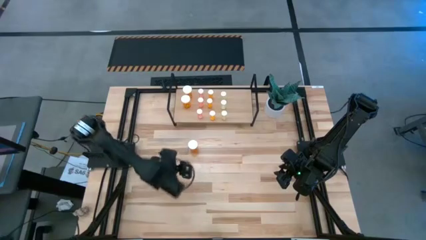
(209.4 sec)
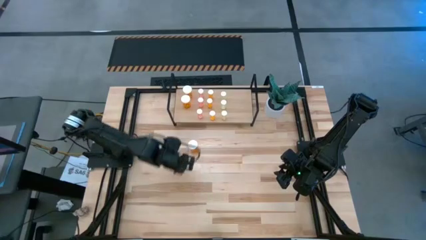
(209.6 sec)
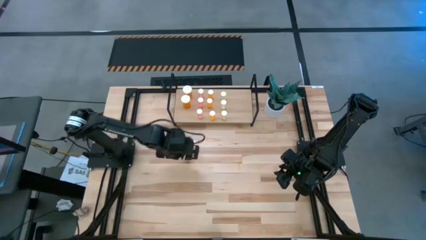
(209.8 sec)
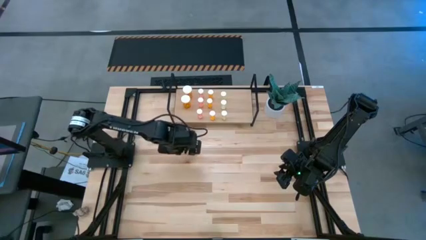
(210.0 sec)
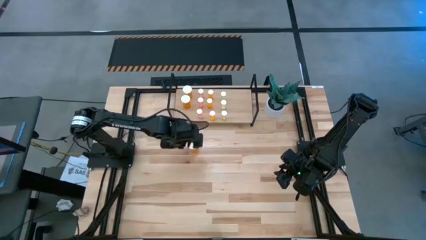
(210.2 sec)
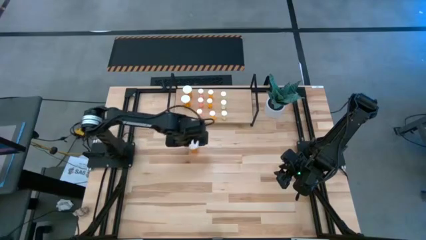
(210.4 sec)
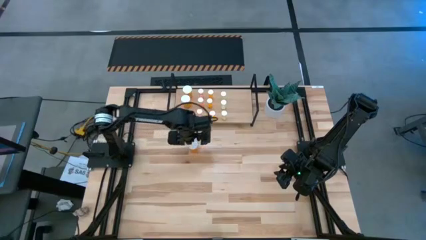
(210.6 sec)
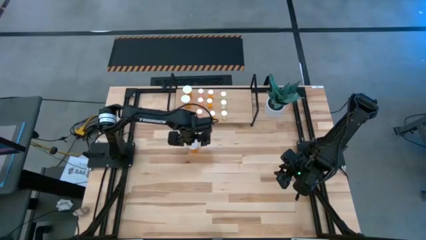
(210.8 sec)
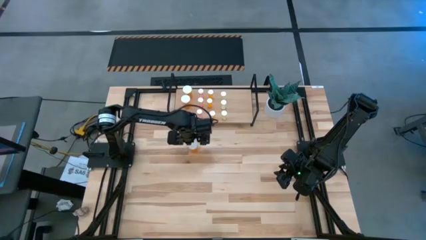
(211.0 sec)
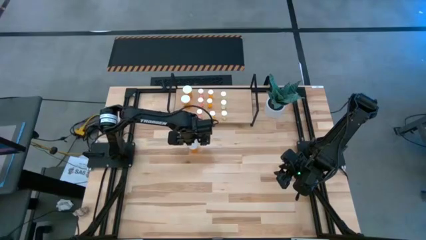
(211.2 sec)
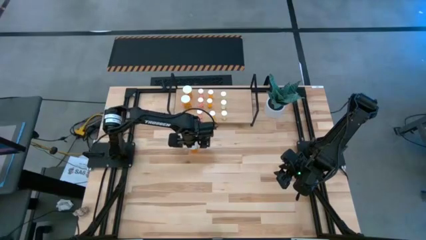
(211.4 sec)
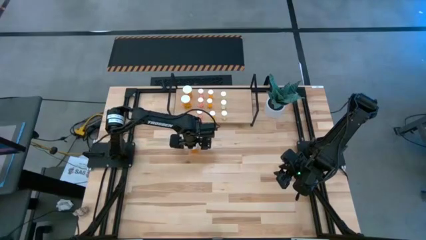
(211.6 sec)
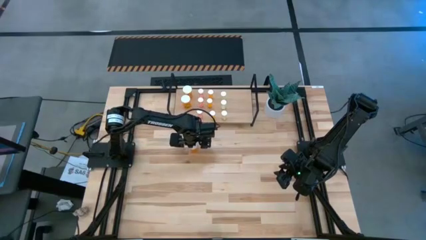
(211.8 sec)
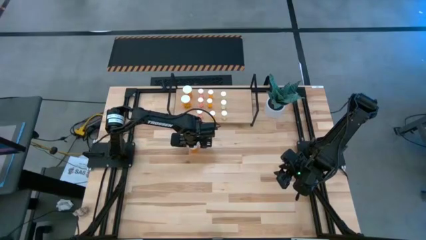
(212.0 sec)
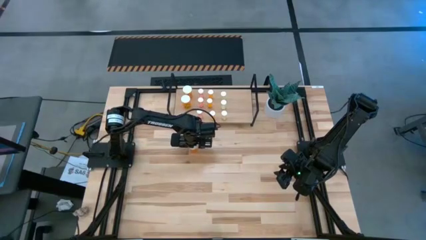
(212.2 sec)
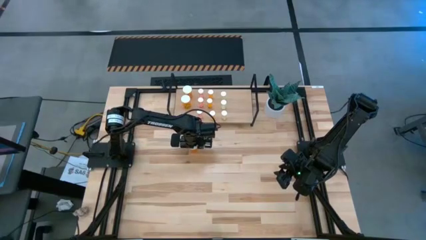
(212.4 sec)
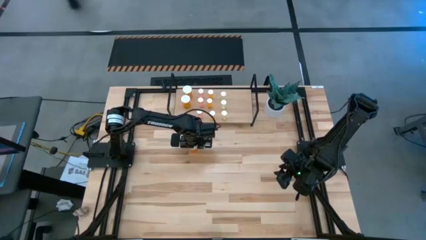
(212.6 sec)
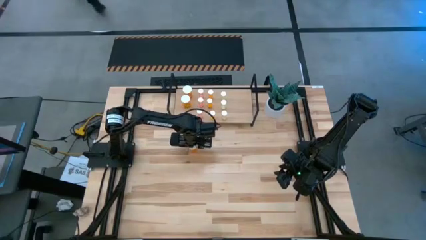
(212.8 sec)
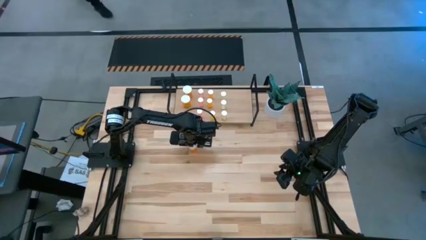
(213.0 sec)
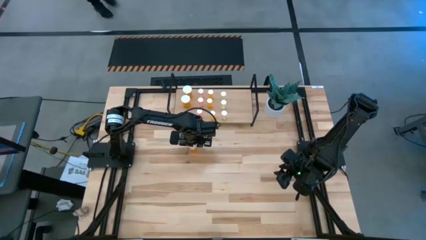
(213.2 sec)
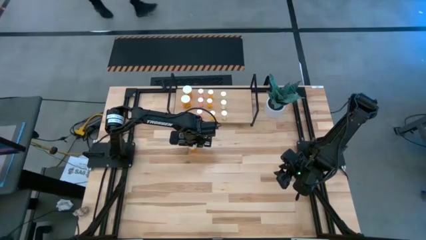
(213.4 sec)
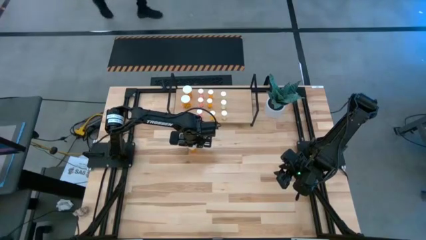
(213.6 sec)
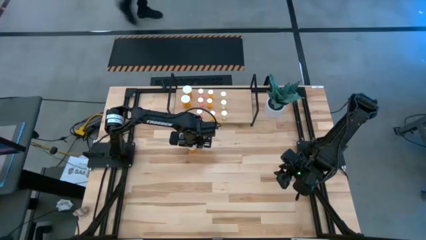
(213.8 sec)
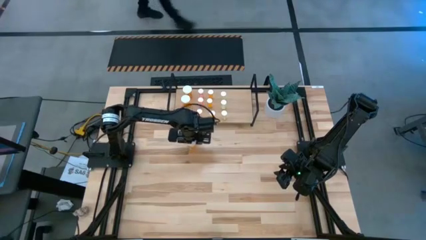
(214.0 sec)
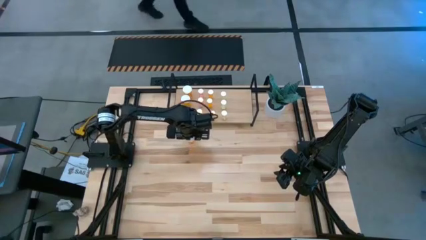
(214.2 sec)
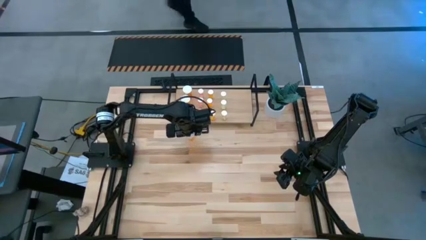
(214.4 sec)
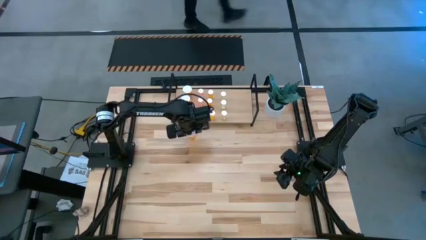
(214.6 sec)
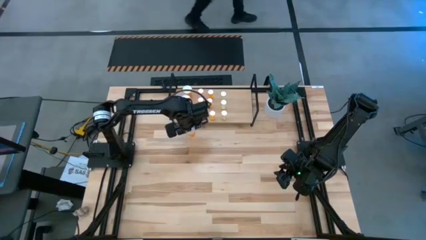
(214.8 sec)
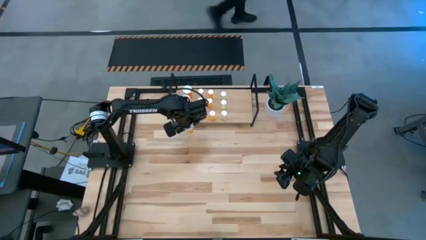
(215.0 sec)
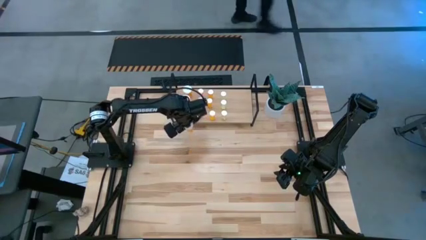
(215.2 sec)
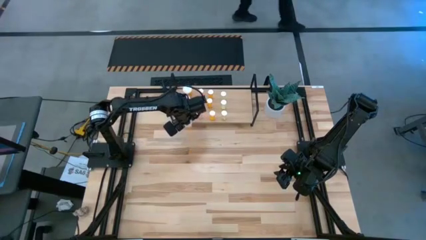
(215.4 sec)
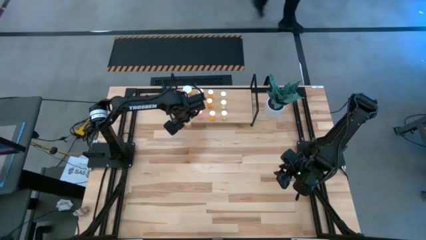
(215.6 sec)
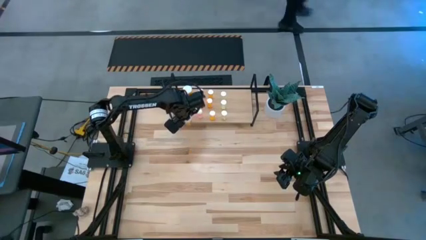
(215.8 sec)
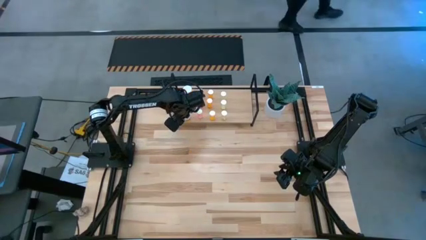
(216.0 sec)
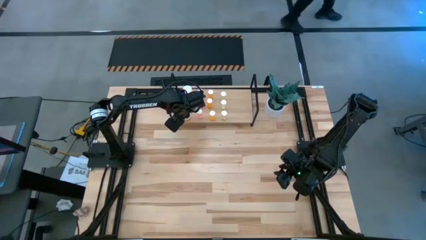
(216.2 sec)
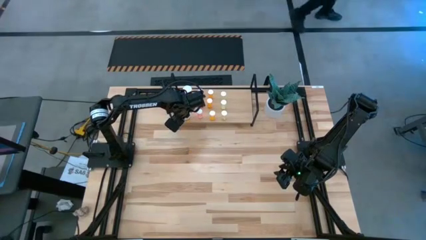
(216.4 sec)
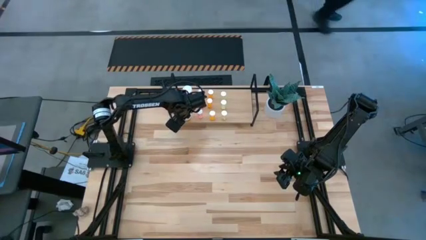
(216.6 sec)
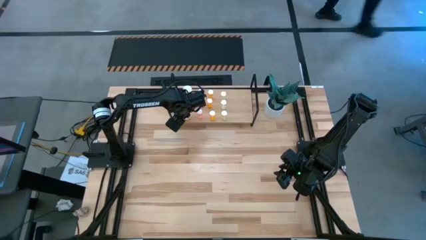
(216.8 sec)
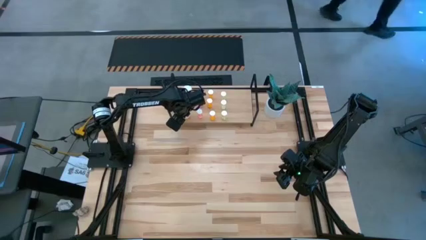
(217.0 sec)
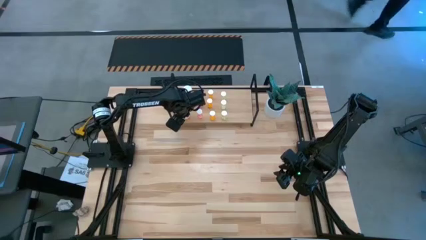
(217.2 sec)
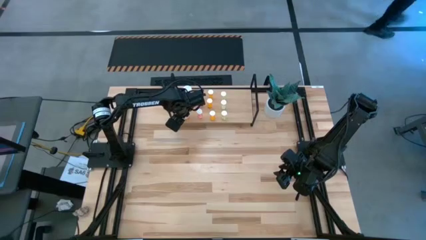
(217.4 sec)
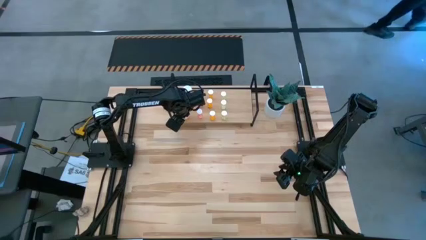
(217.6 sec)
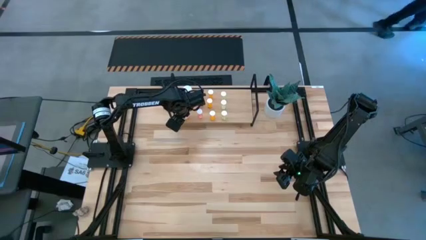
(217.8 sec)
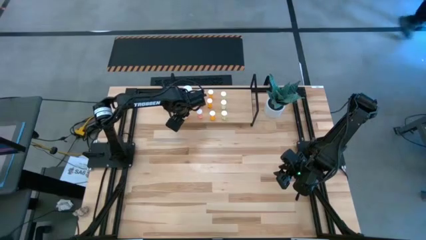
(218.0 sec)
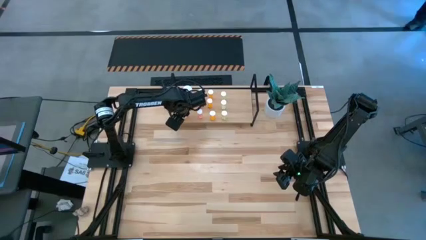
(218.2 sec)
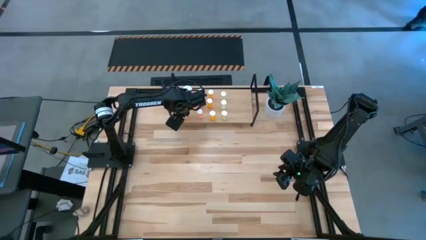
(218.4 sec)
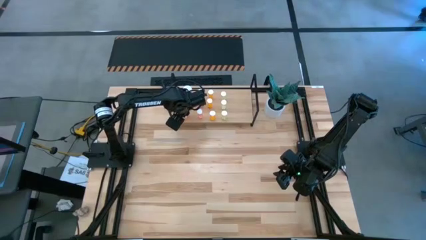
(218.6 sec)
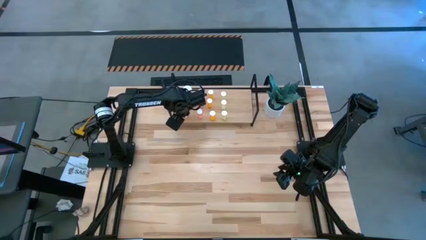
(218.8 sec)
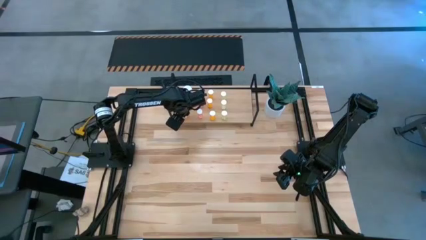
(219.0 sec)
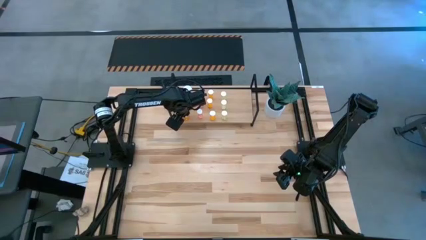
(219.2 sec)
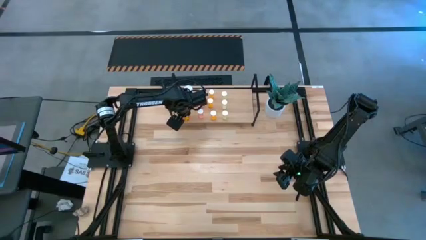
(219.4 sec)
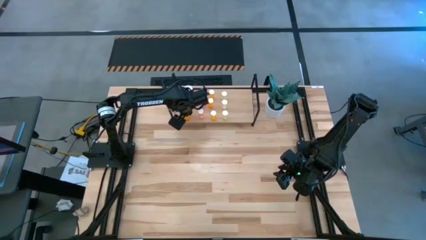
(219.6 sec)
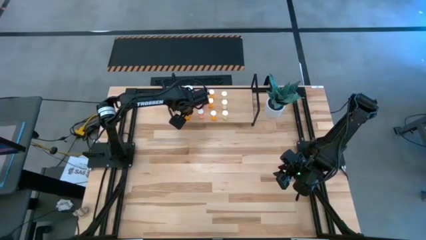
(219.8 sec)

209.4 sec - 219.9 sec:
Task: Pick and place medicine bottles onto shelf by color
Put the big orange pill bottle on the shelf aligned with the other big orange pill bottles

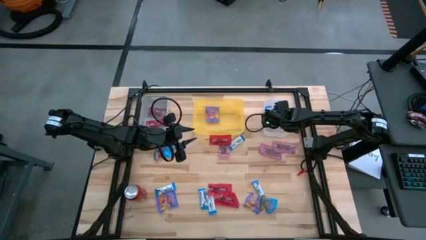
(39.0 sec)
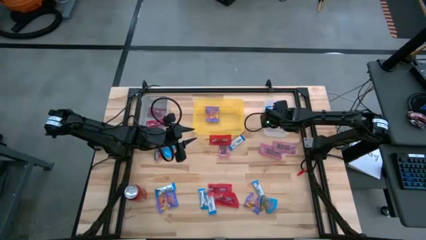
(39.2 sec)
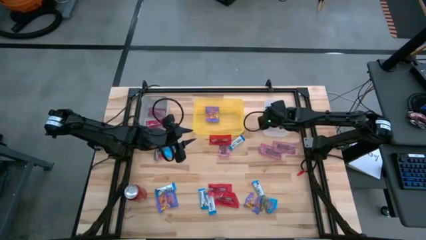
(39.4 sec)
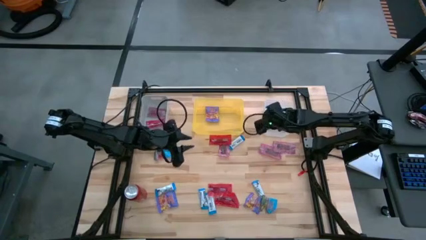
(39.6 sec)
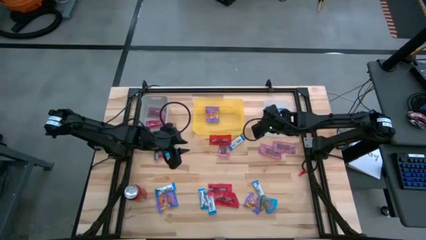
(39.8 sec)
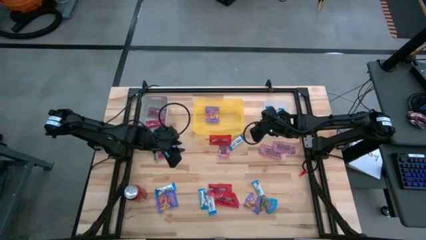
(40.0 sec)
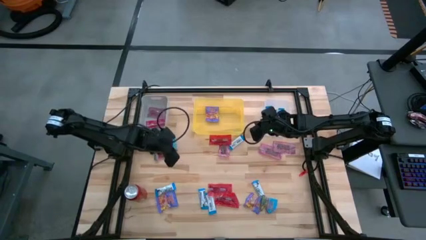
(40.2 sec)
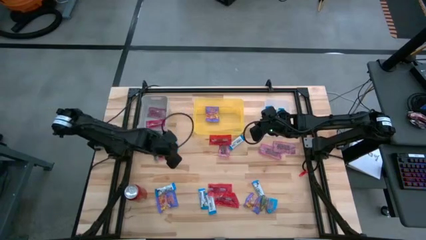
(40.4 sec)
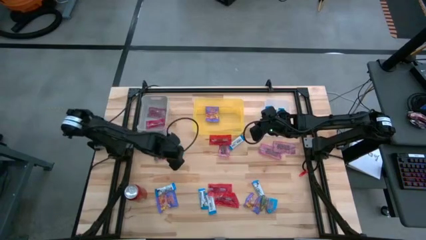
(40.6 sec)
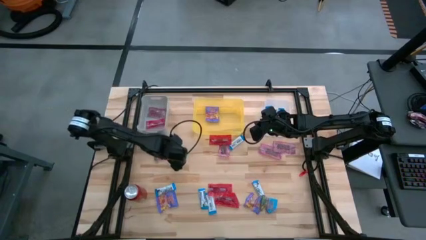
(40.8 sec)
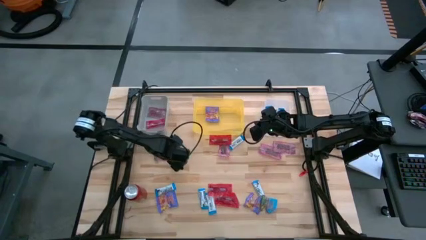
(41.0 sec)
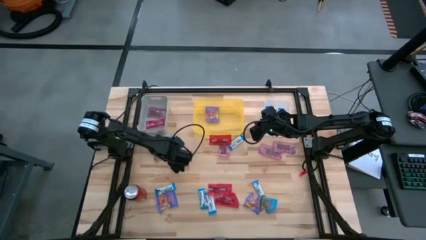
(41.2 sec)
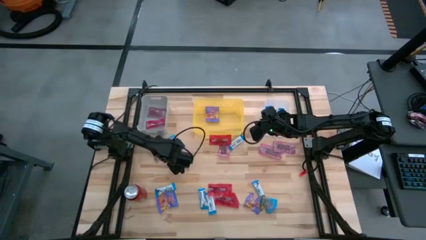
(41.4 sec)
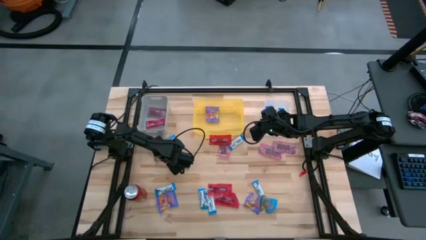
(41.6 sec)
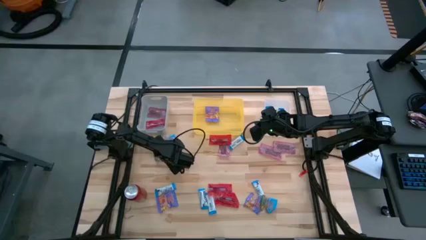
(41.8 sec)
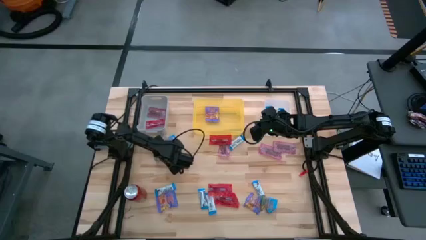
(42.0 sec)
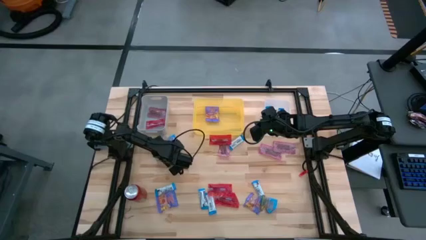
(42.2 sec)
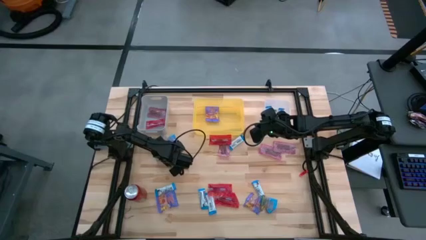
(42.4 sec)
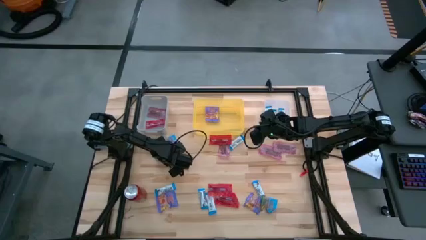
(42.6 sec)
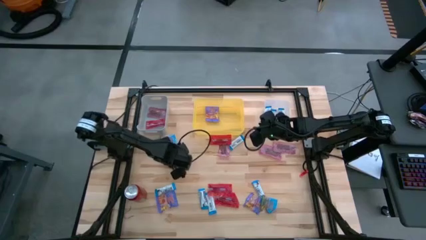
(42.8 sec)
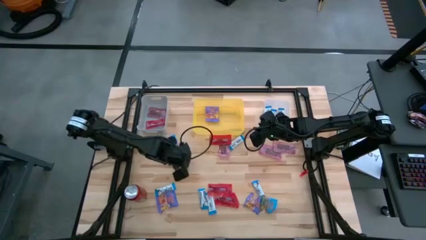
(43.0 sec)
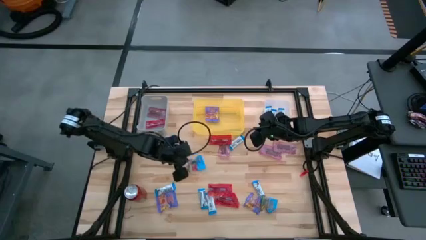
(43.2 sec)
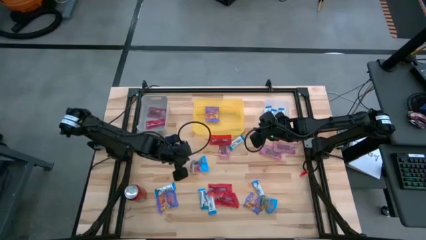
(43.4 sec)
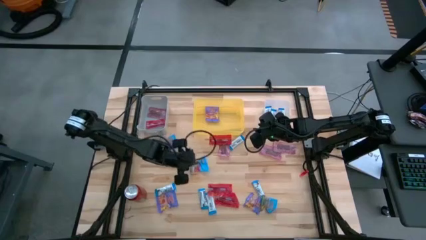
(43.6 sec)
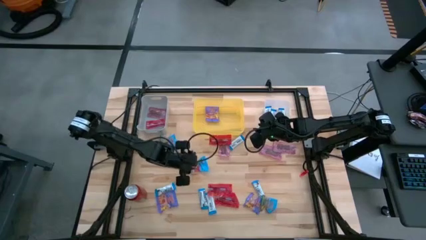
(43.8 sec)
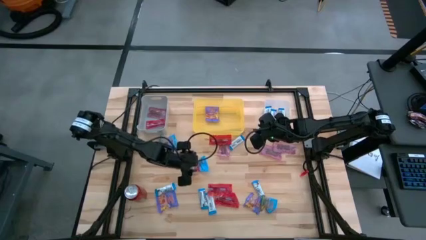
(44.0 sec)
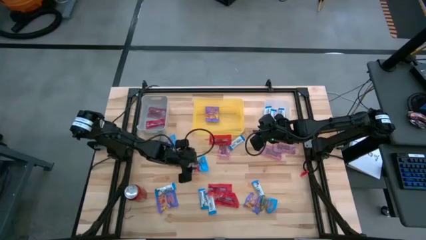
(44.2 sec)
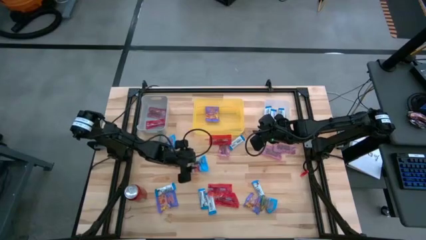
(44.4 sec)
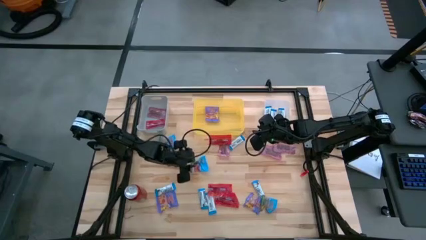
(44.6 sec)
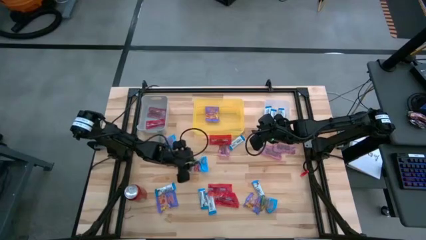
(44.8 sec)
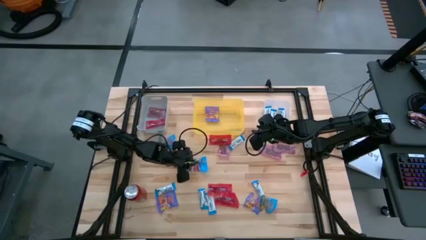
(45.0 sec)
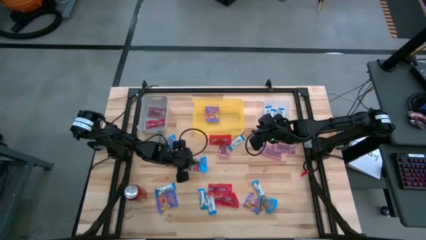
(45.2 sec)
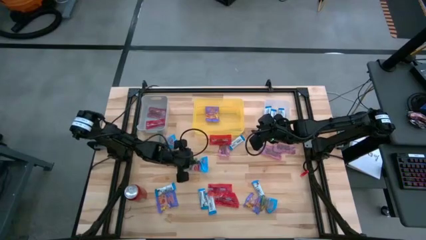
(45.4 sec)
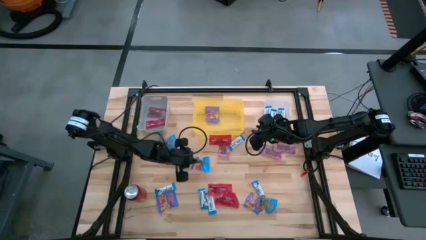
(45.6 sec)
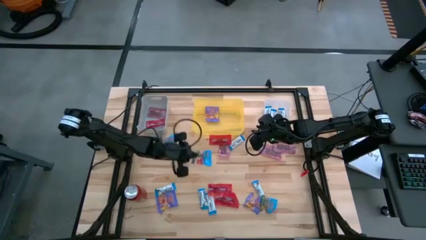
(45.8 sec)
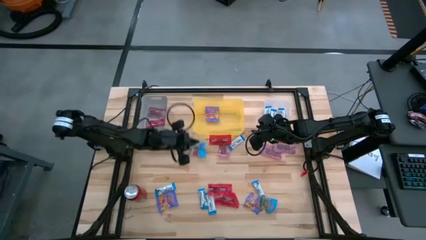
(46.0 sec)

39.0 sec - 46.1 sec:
Task: Sort candy
Put the blue gummy into the yellow bin
